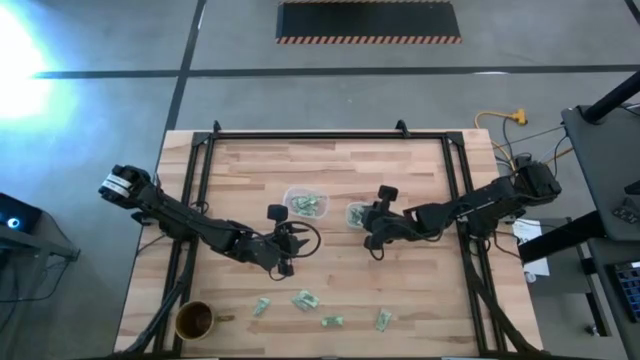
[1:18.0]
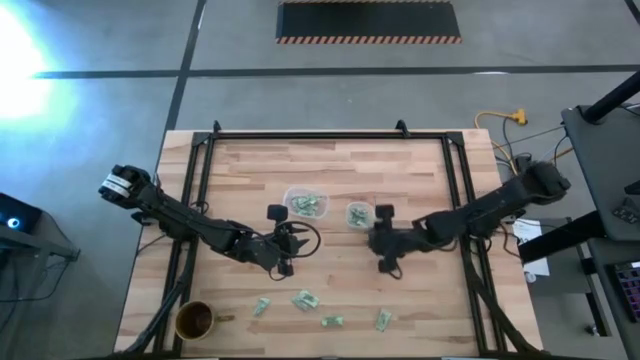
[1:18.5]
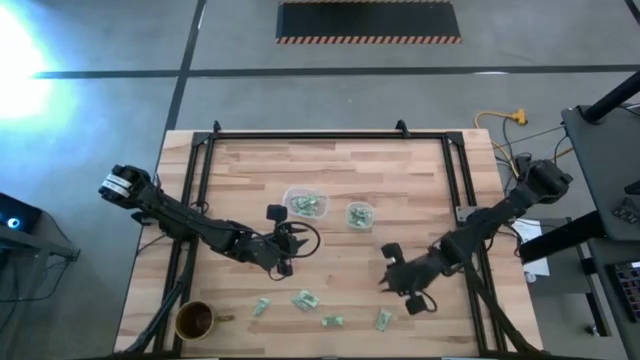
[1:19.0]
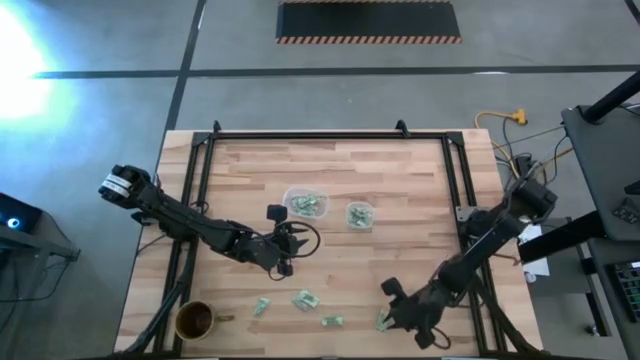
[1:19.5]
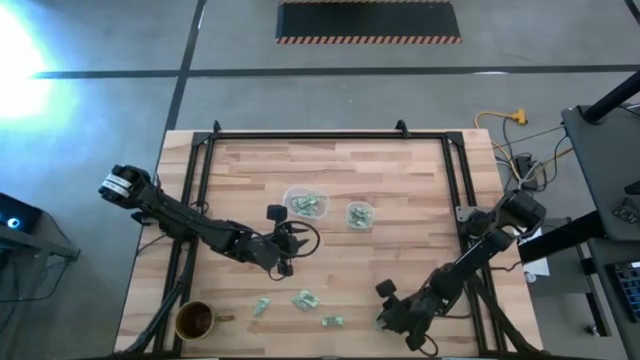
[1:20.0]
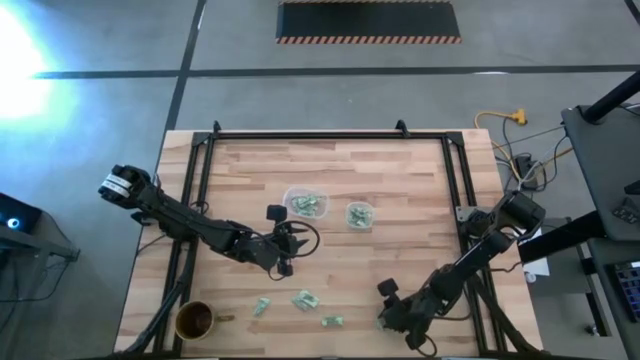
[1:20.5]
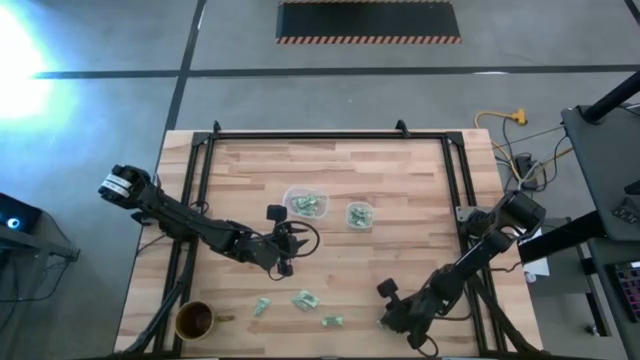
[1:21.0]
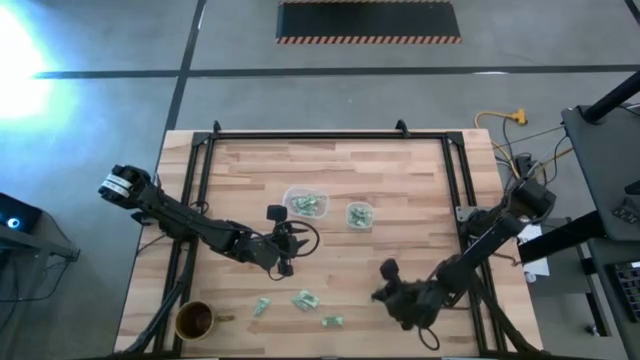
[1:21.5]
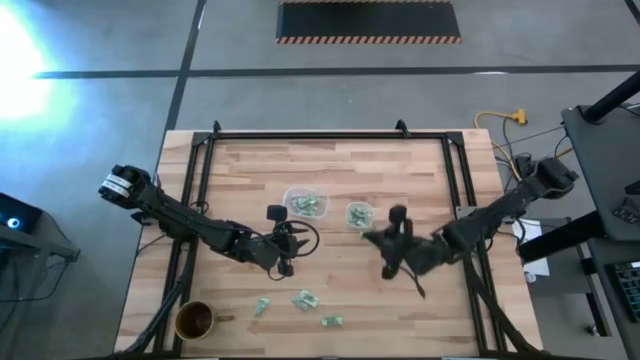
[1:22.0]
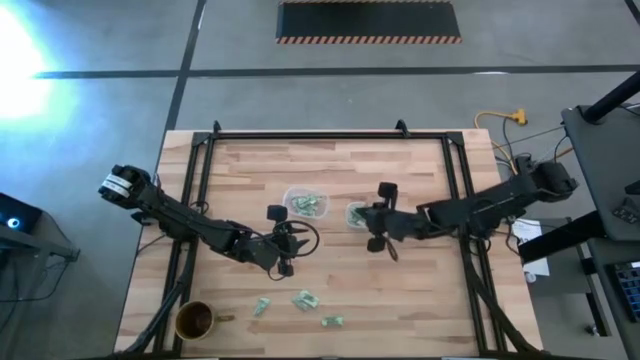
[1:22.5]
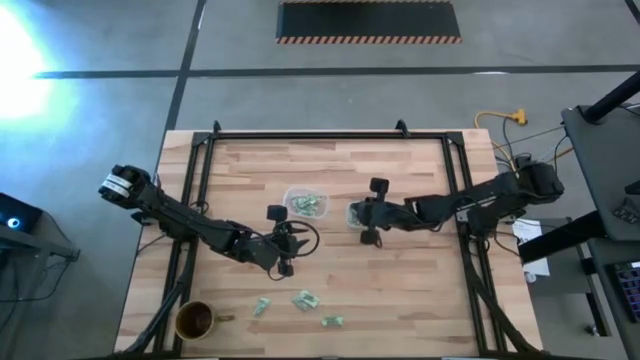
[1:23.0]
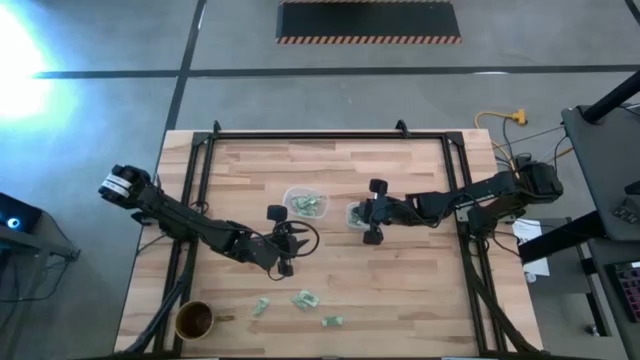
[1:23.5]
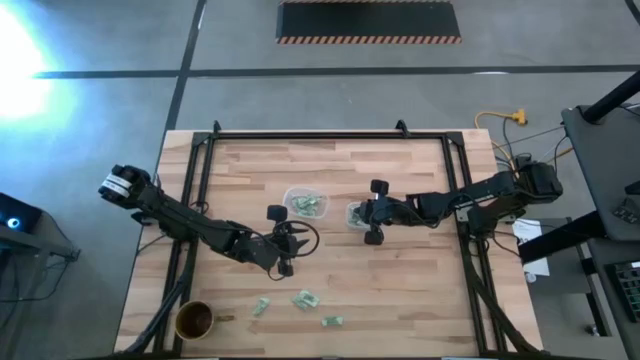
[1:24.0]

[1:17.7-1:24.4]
Task: Pick and place items into bin
Put the green stevia packet into the right transparent bin

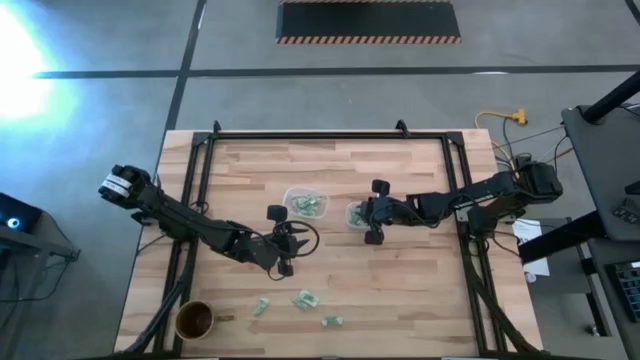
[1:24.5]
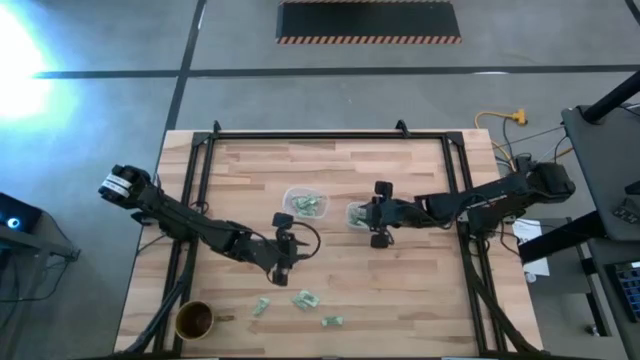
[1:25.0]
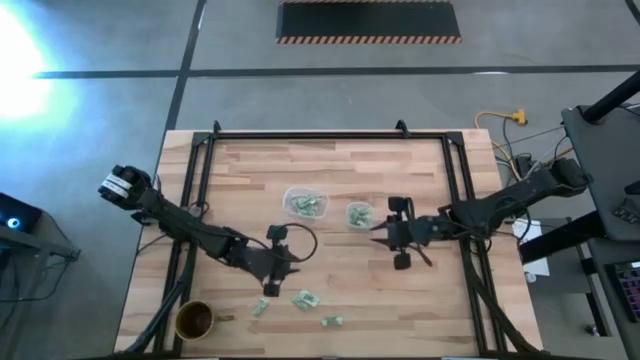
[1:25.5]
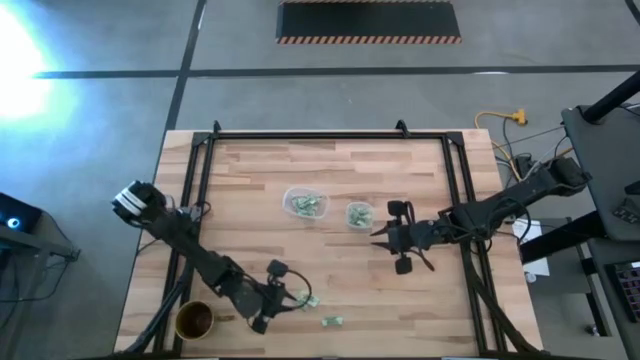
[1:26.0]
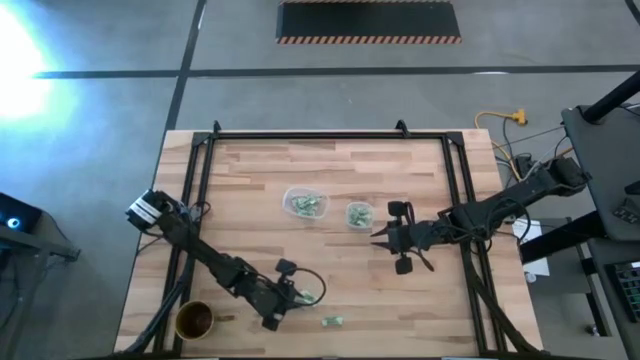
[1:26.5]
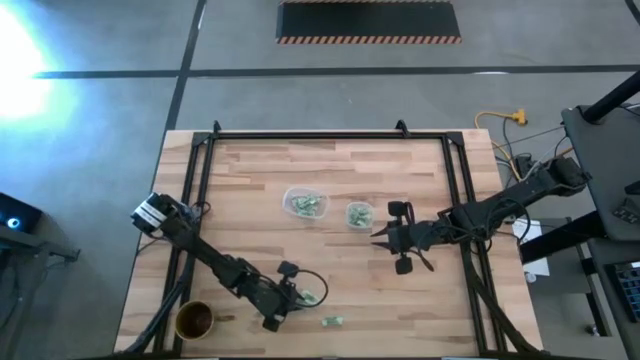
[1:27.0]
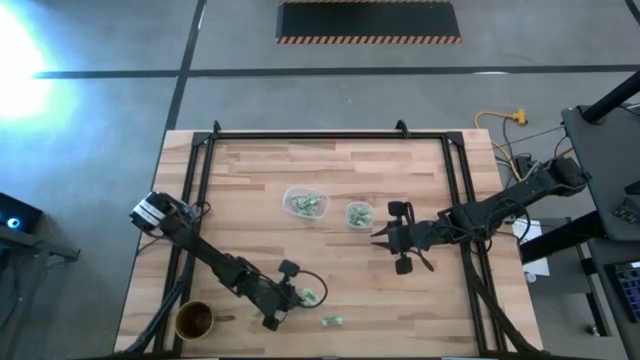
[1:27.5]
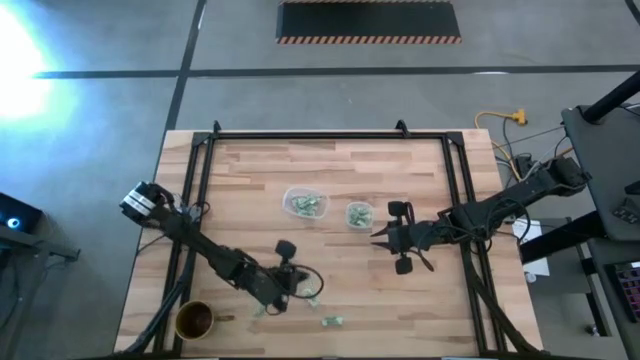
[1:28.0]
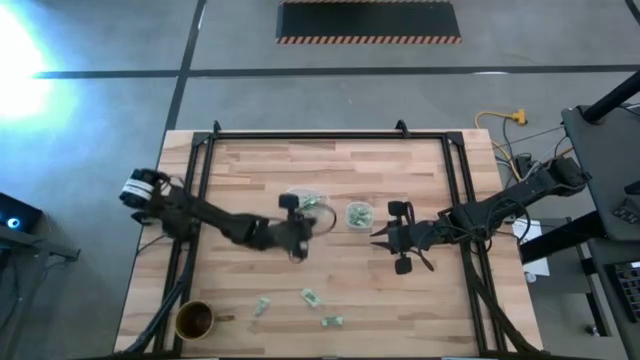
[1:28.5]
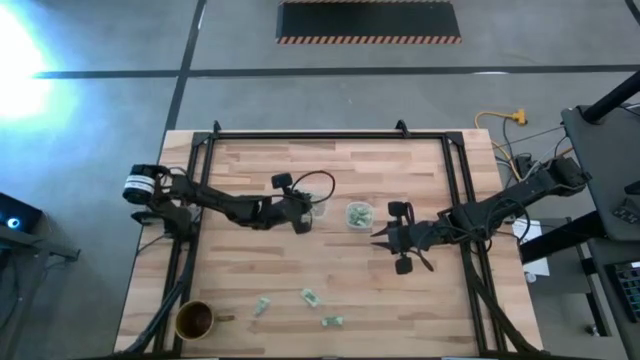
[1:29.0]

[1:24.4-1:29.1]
Put the green stevia packet into the left transparent bin

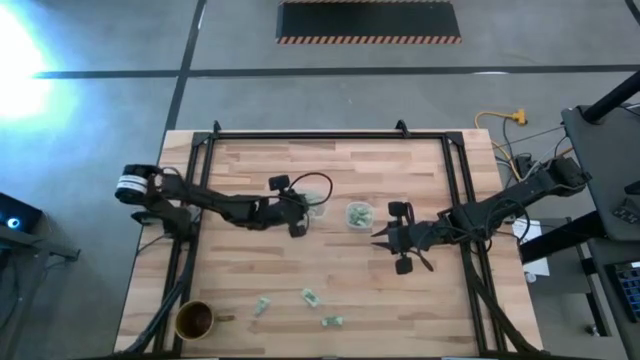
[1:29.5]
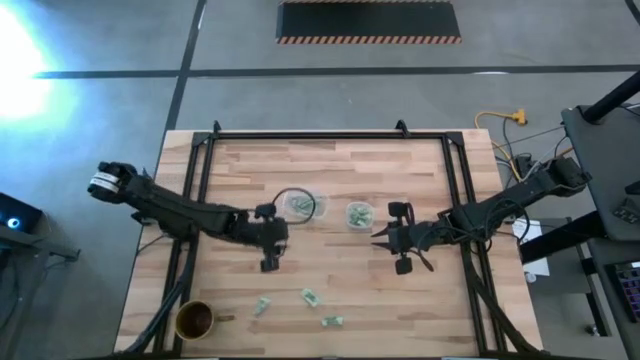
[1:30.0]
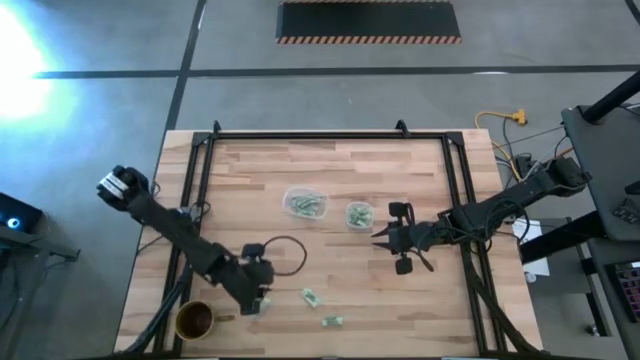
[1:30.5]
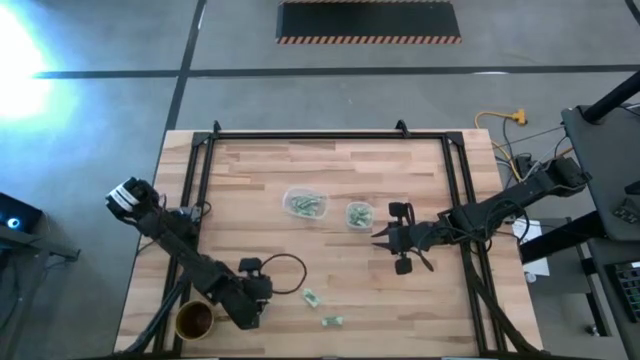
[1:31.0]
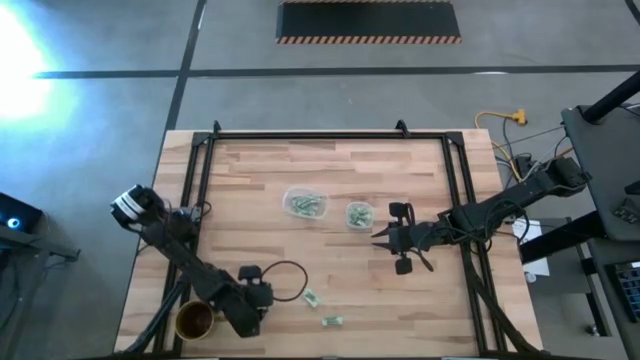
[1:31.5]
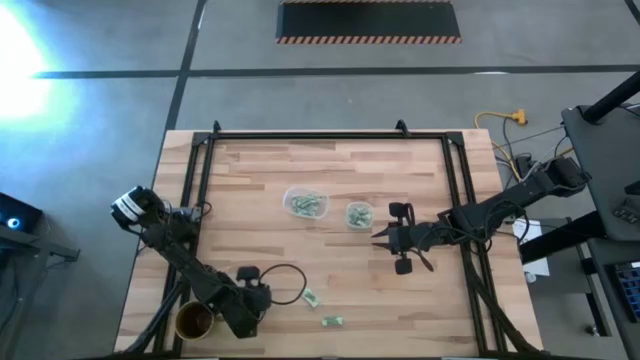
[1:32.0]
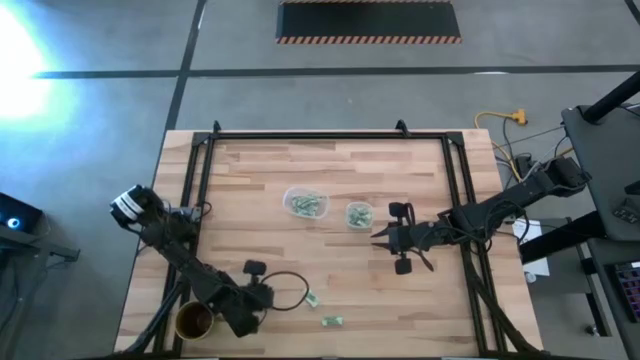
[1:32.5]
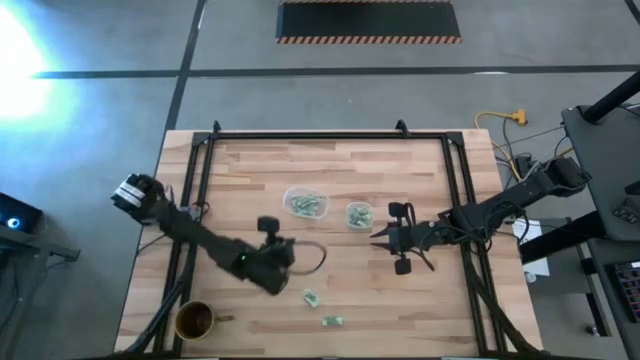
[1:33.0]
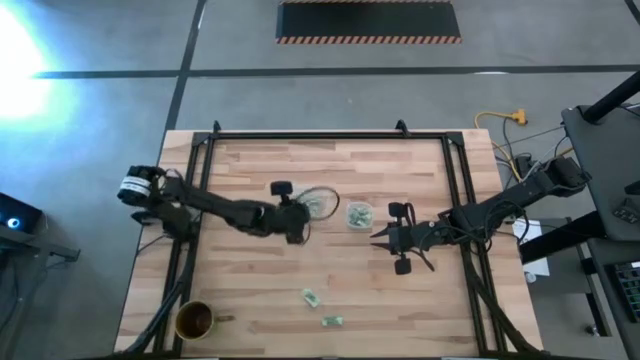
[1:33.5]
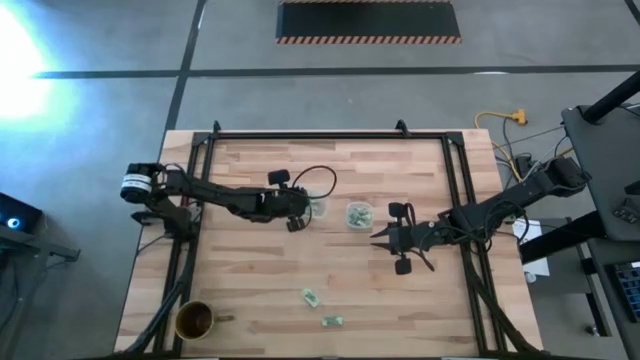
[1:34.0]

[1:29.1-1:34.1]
Put the green stevia packet into the left transparent bin

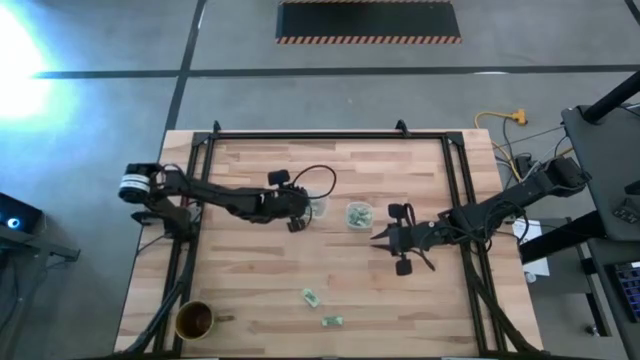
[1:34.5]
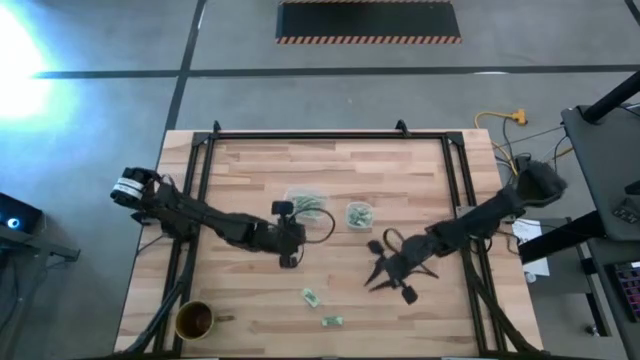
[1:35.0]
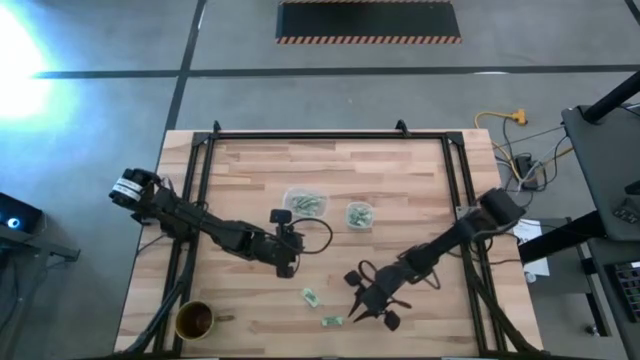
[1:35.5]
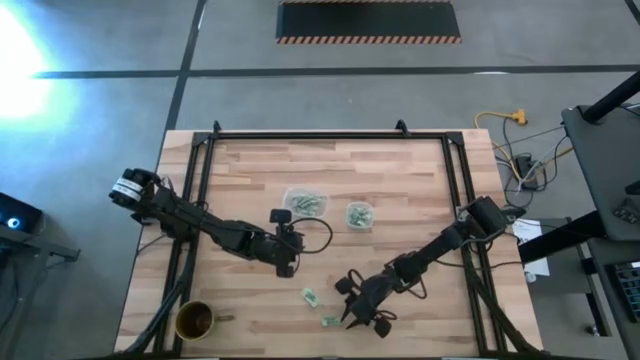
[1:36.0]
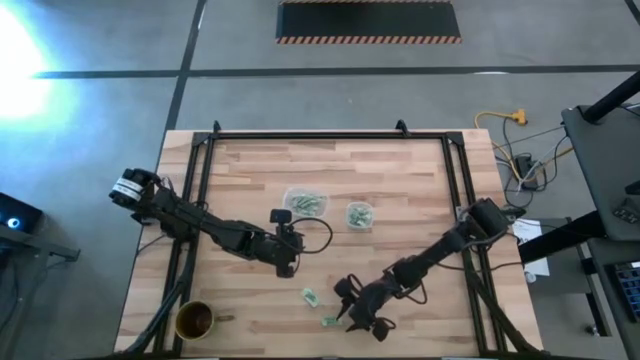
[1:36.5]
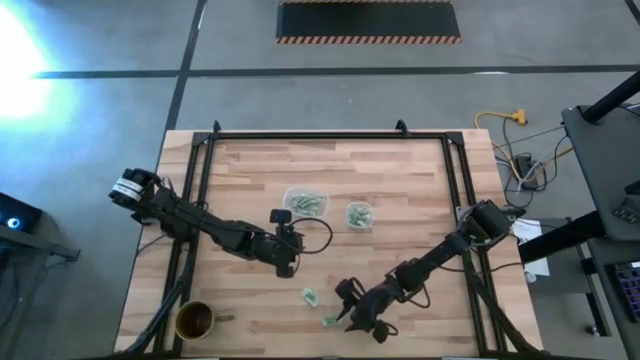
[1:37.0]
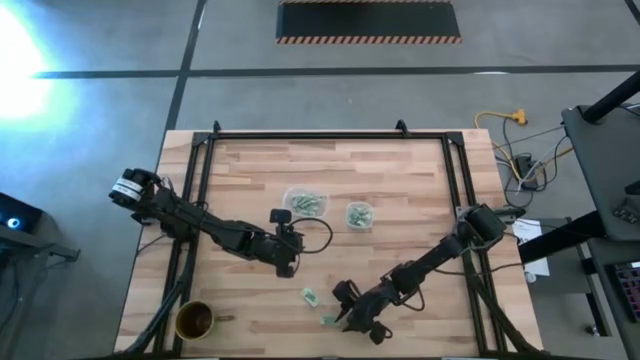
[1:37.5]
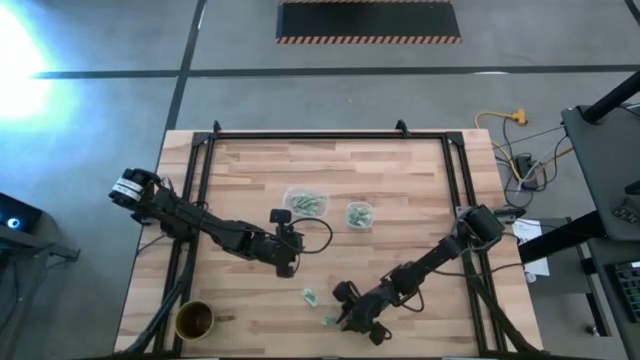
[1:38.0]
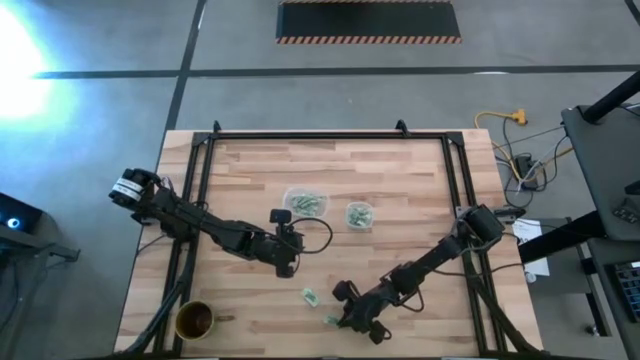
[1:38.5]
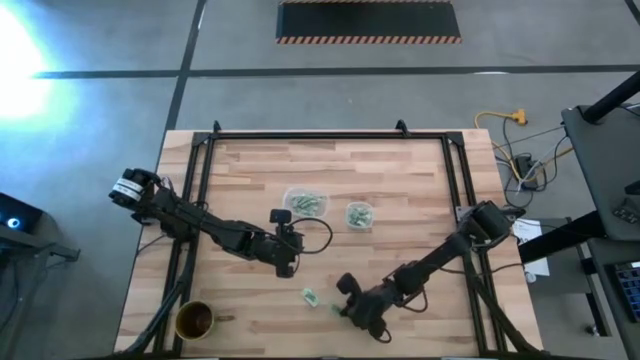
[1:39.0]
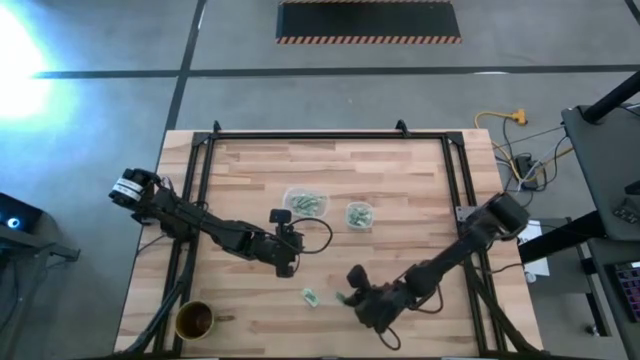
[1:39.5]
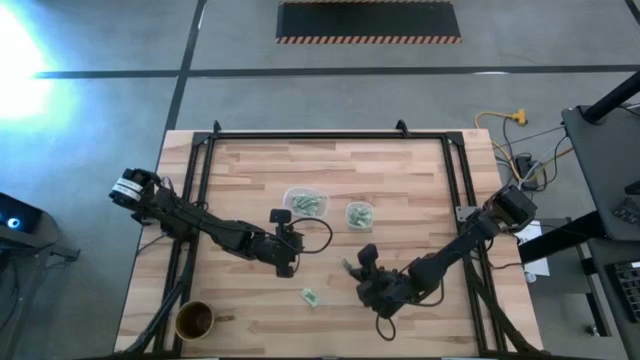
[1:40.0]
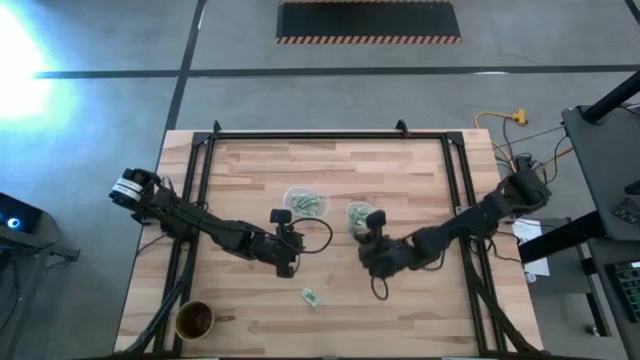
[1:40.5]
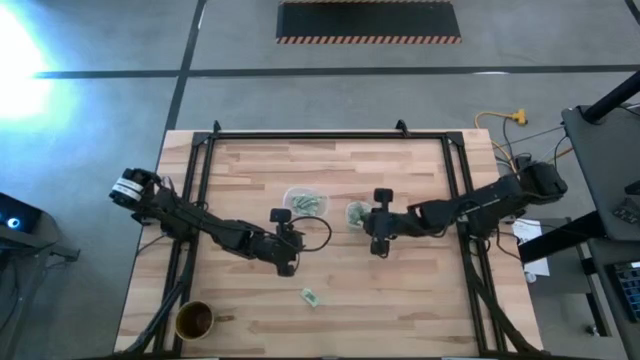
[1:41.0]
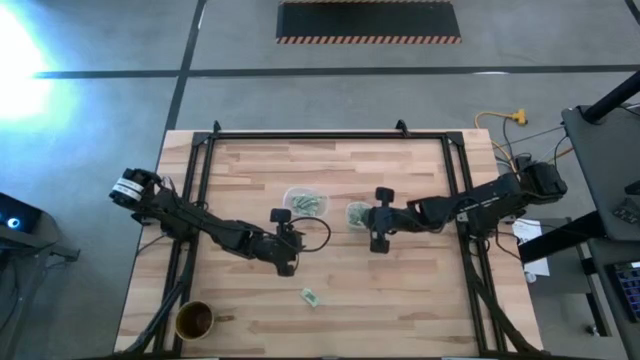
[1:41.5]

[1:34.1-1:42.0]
Put the green stevia packet into the right transparent bin
